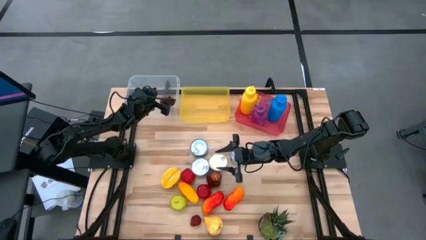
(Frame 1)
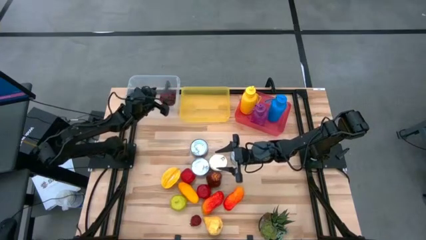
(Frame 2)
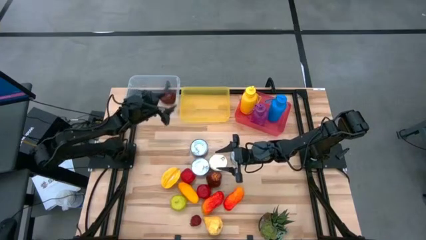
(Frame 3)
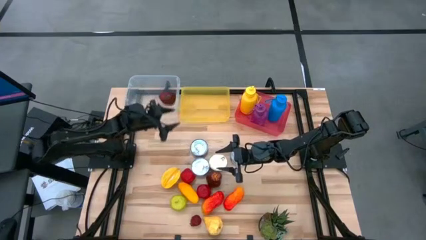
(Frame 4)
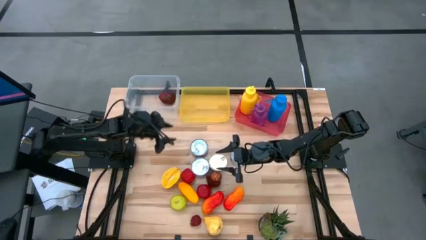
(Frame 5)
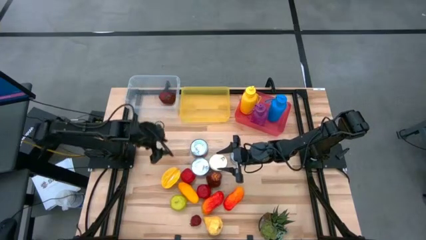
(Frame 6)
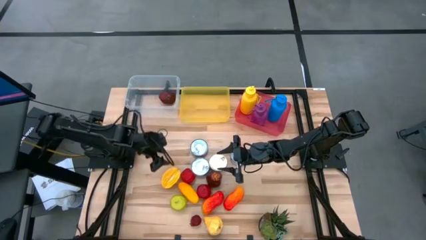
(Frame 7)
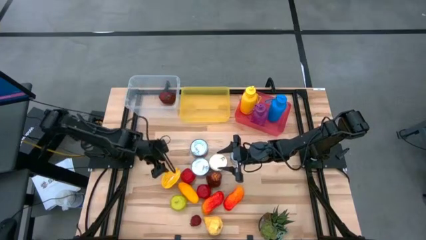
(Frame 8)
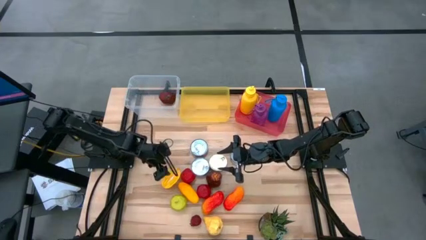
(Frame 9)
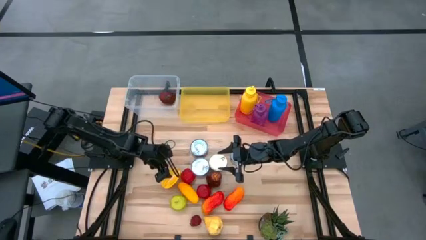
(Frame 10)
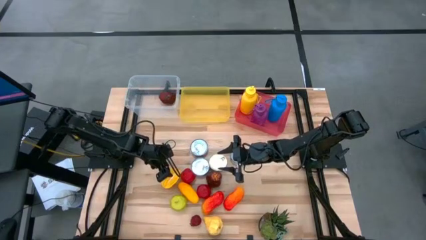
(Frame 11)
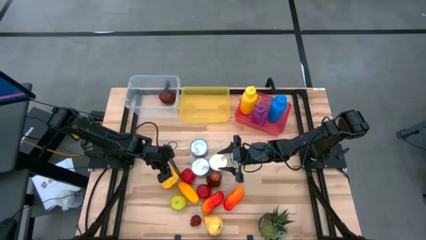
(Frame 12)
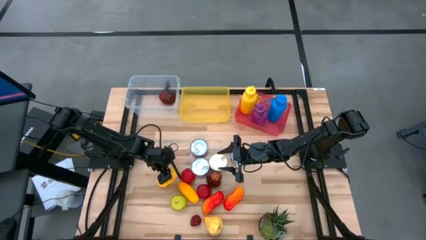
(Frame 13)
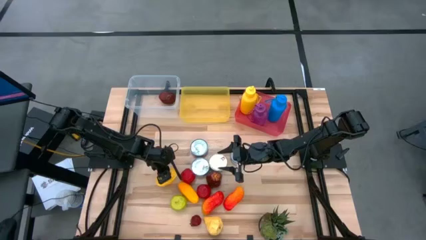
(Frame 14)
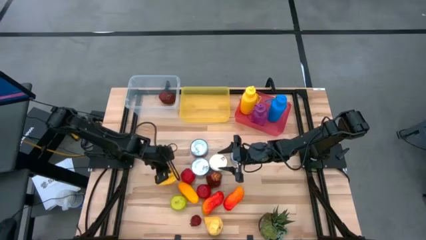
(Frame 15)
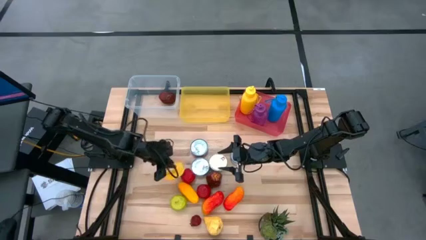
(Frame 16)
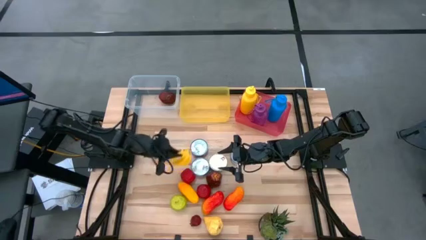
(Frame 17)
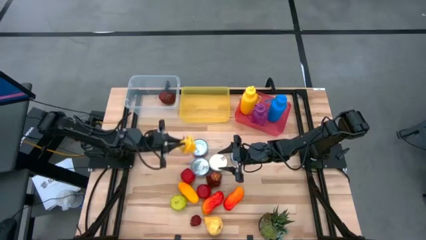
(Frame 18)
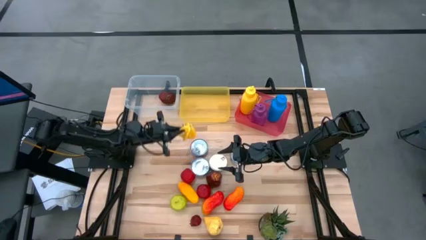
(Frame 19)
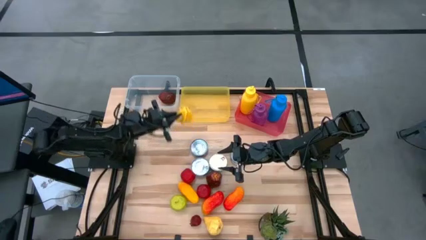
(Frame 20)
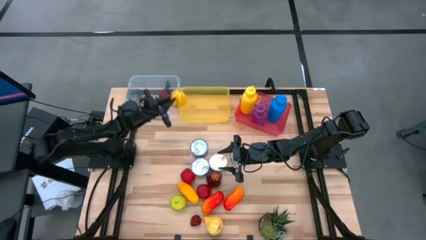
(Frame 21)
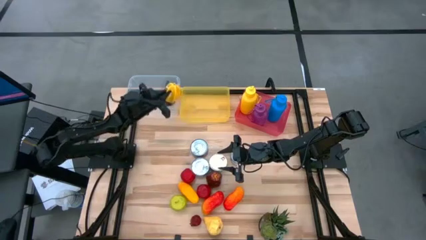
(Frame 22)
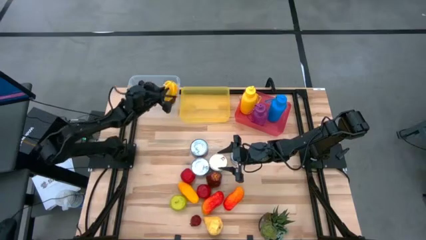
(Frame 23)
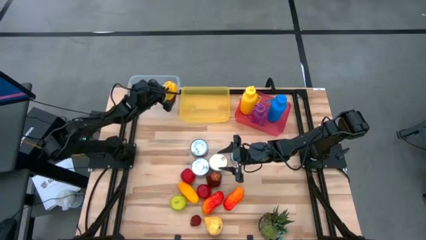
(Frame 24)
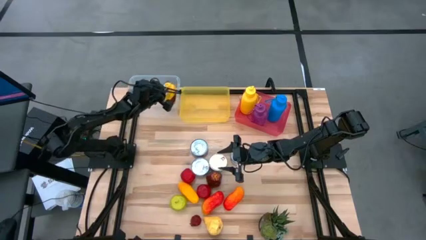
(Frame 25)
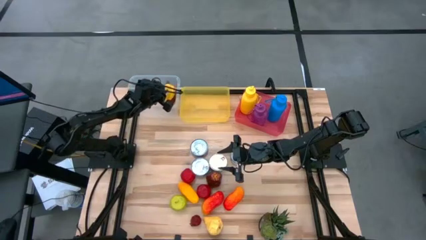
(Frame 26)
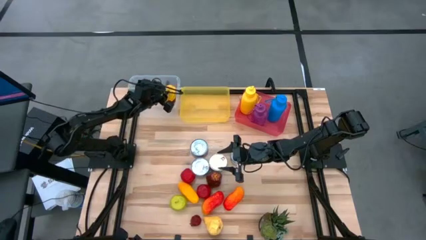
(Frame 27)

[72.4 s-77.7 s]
Task: Pick & Place Food Item
Put the yellow star fruit into the transparent bin

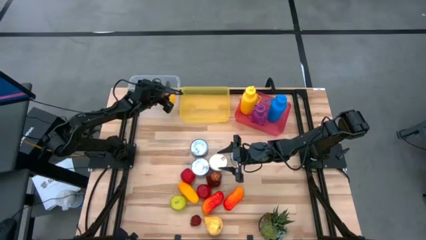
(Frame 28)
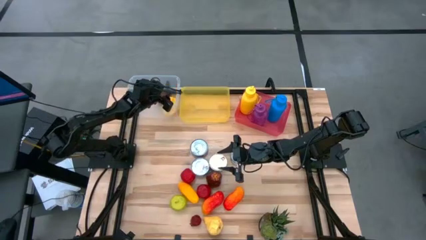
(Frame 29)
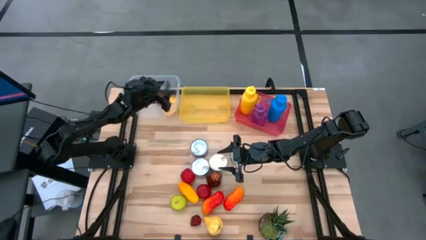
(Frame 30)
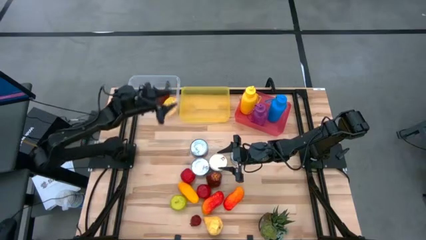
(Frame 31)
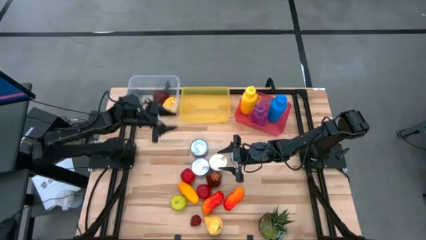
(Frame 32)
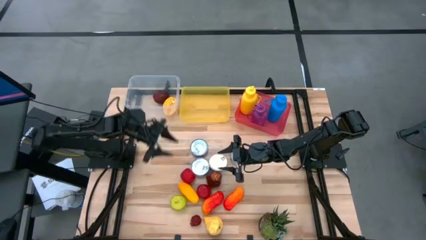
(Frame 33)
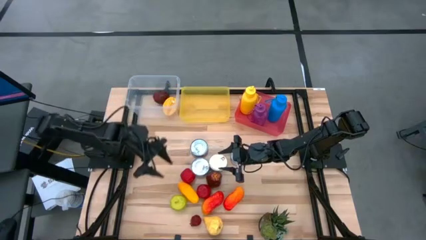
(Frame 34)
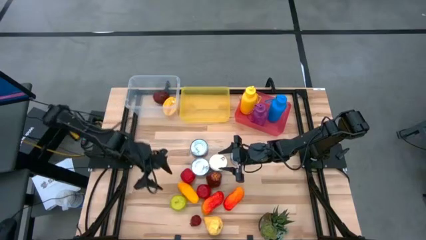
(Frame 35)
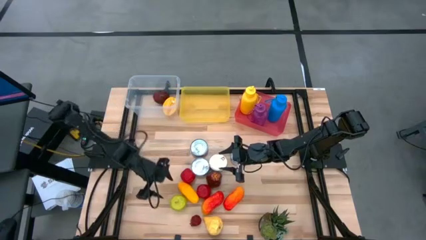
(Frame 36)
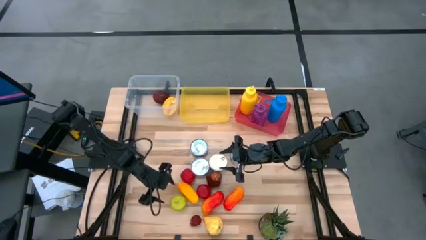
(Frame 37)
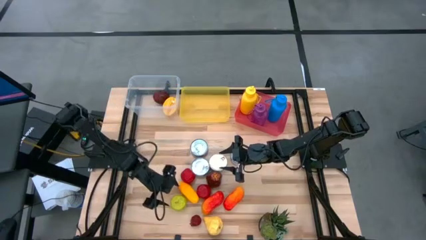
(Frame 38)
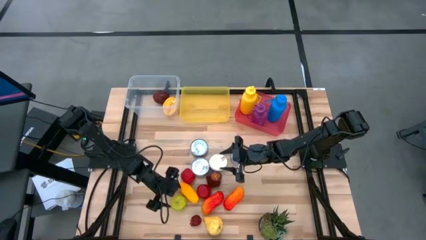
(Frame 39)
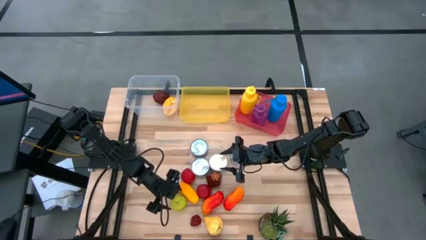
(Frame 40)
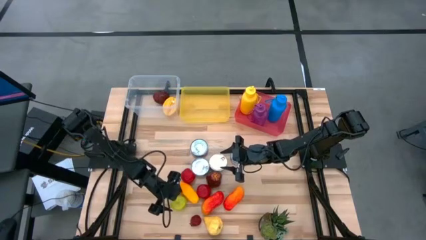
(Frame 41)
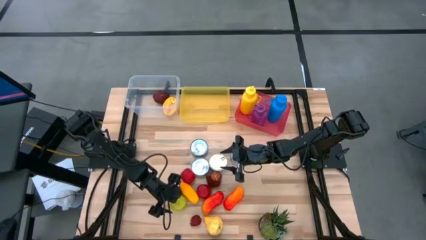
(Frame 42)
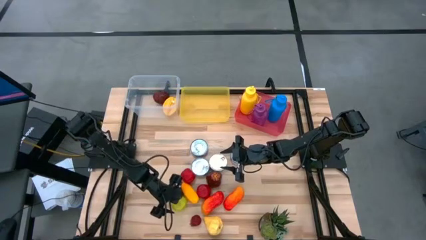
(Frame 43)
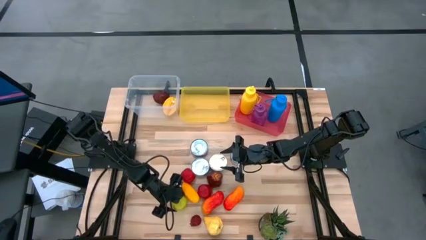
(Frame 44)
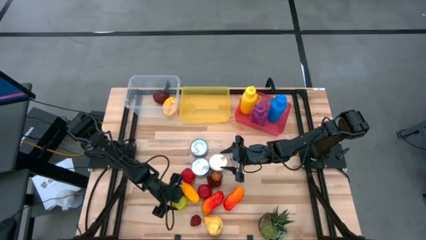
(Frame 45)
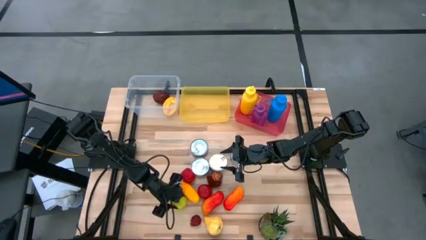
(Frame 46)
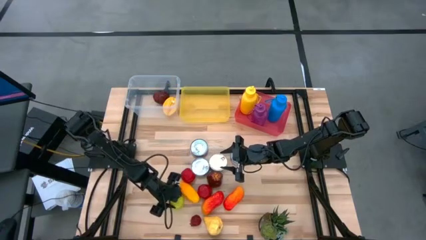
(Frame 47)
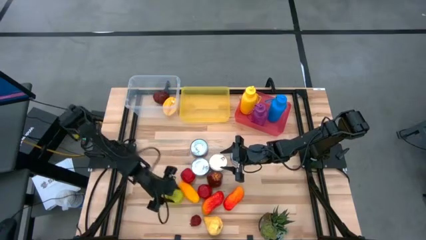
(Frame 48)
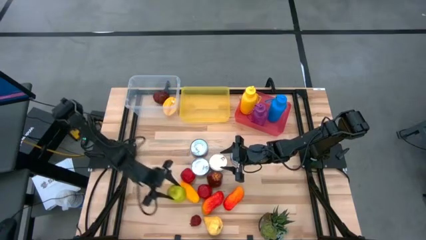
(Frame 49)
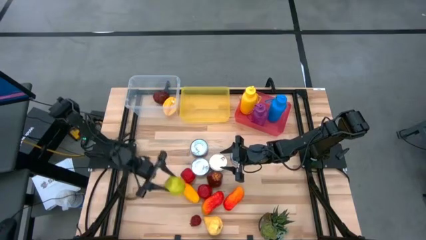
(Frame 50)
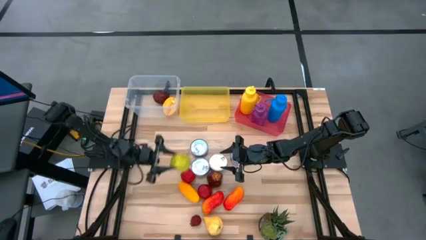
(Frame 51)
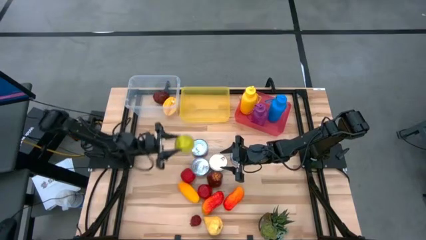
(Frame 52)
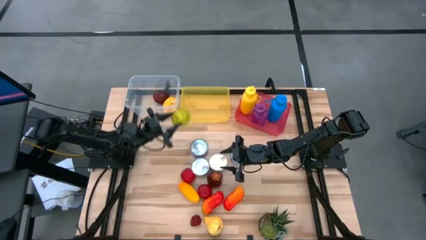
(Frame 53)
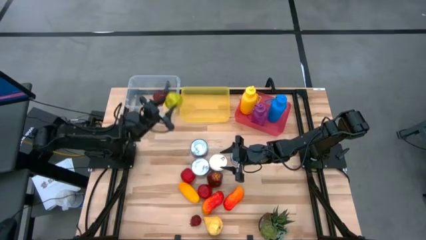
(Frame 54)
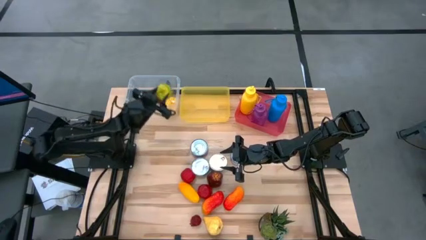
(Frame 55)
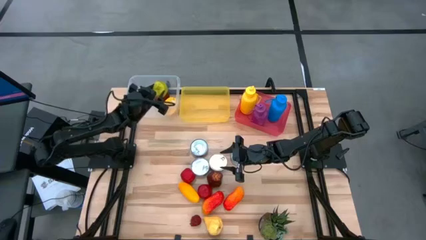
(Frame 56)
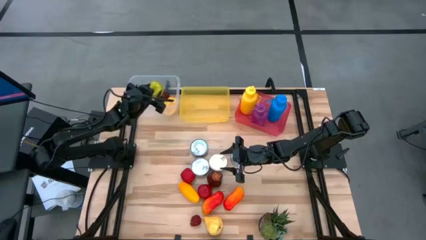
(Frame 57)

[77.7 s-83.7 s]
Put the green apple into the transparent bin

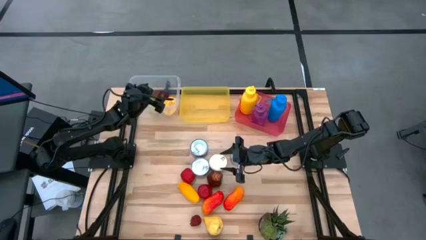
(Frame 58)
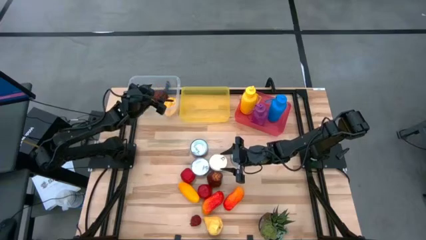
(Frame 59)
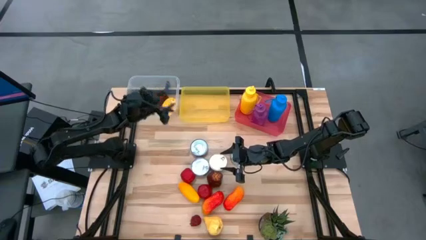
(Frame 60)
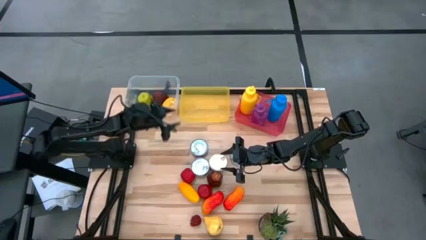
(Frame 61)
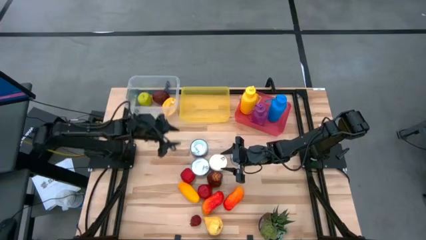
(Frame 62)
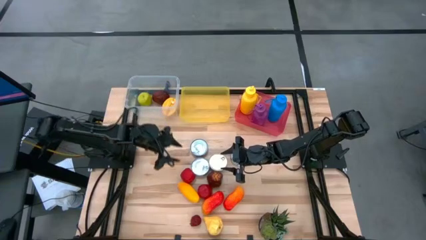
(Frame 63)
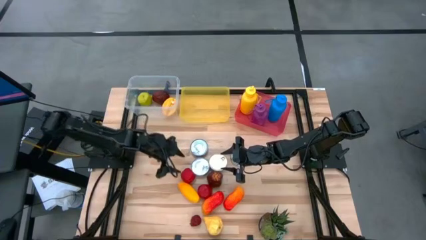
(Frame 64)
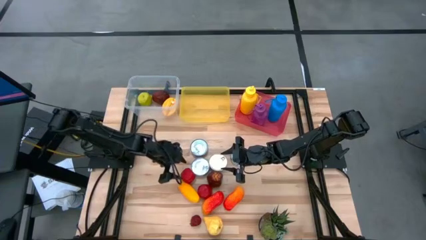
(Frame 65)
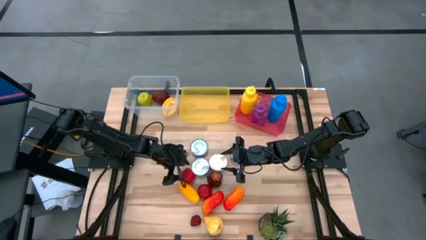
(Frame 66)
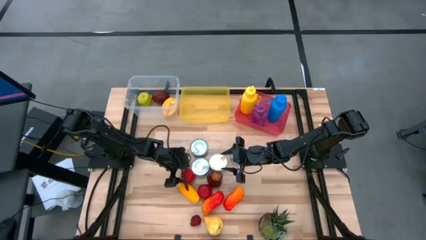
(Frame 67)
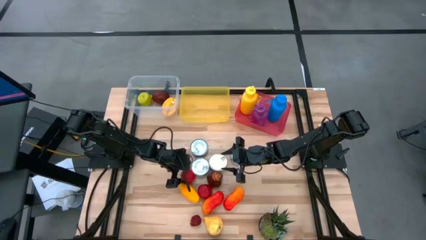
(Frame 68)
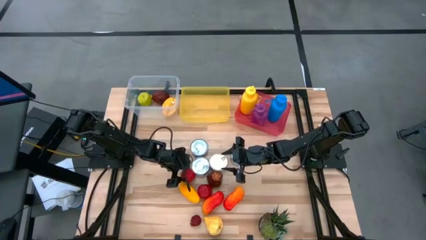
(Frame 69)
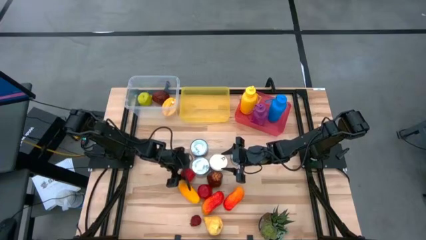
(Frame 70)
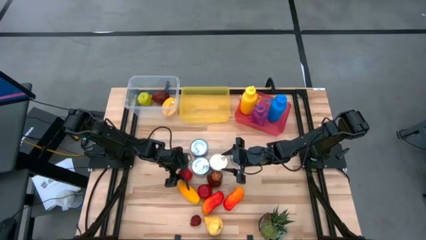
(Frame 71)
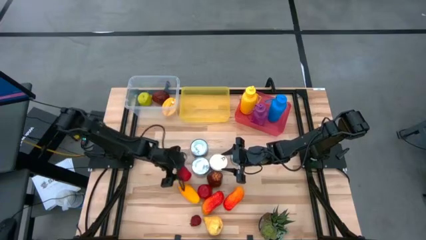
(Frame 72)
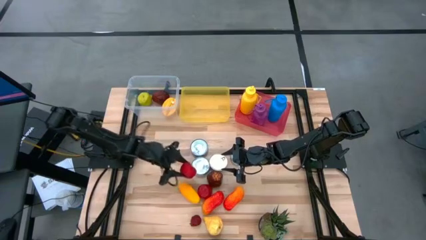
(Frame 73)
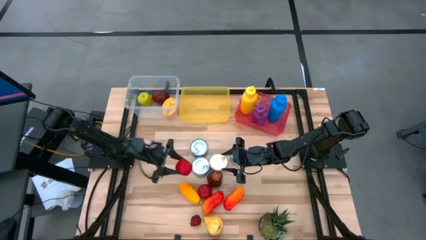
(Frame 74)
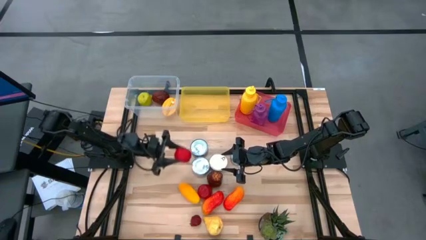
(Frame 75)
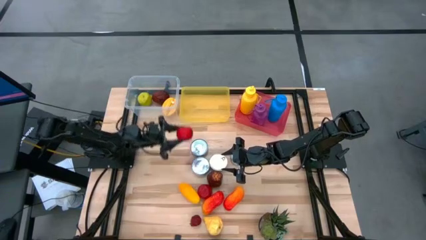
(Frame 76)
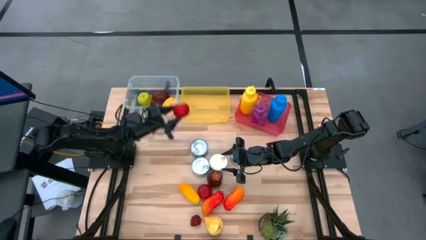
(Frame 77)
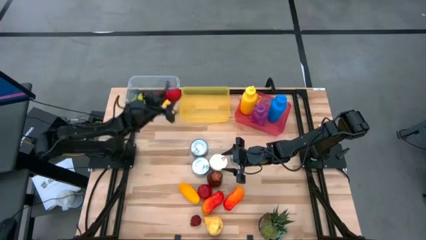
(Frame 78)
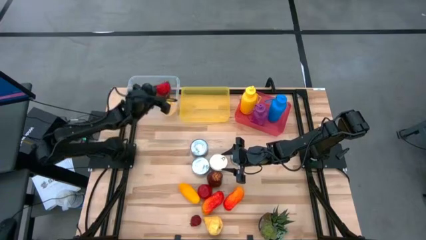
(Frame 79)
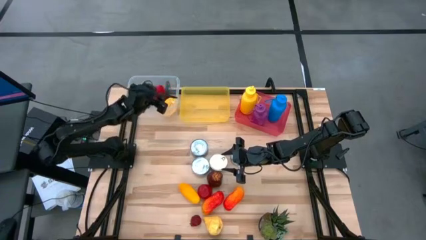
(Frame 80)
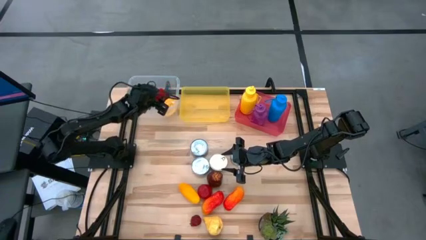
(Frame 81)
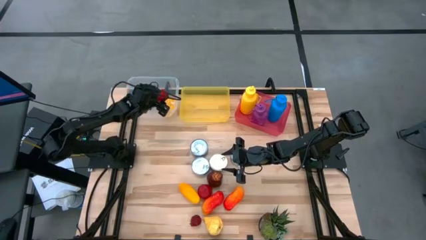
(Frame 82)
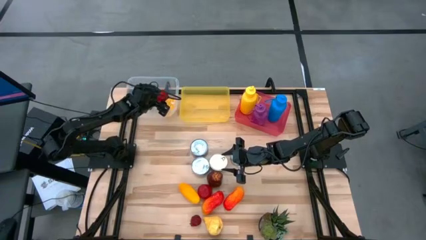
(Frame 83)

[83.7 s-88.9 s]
Put the top red apple into the transparent bin
